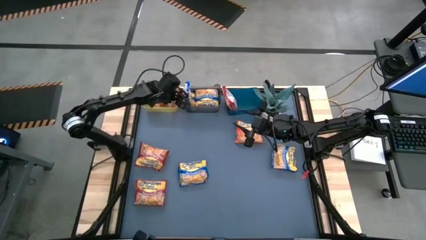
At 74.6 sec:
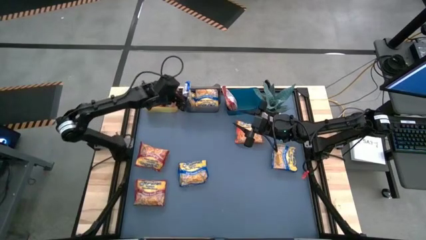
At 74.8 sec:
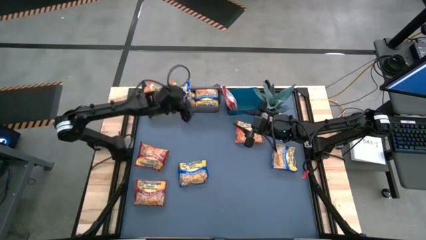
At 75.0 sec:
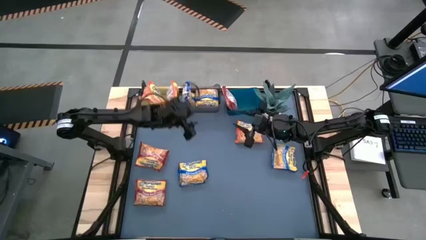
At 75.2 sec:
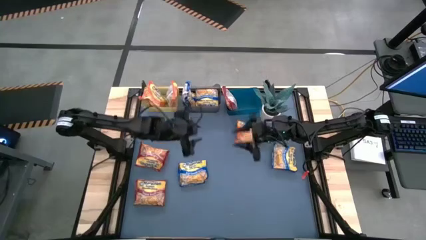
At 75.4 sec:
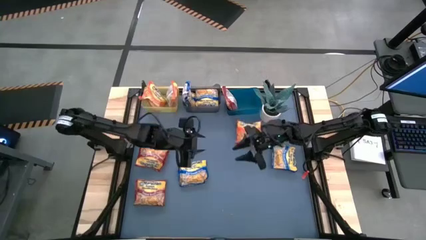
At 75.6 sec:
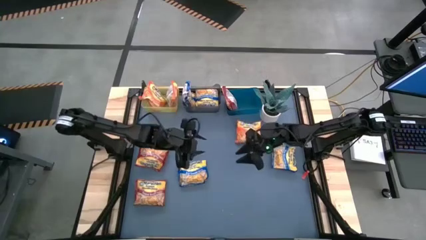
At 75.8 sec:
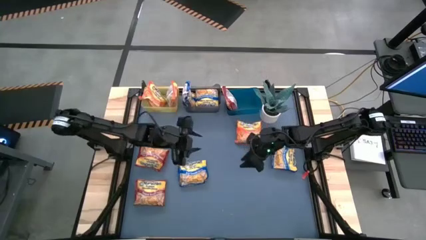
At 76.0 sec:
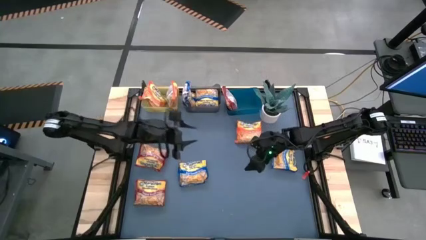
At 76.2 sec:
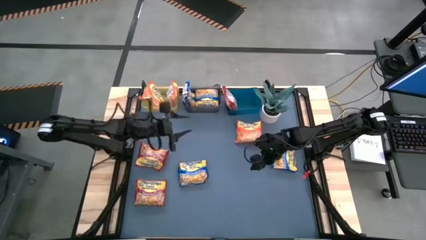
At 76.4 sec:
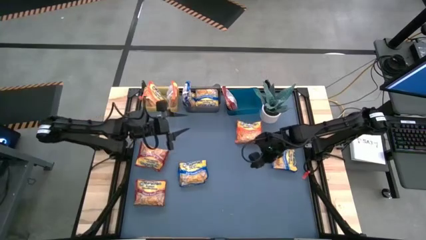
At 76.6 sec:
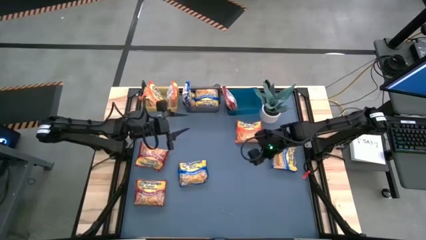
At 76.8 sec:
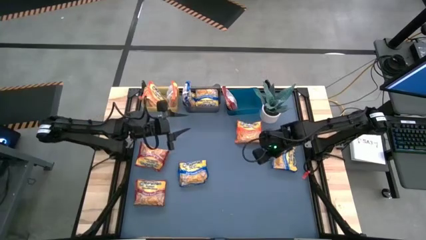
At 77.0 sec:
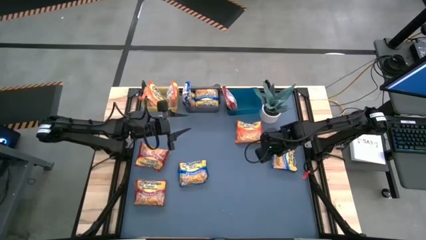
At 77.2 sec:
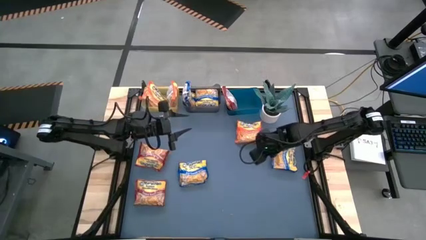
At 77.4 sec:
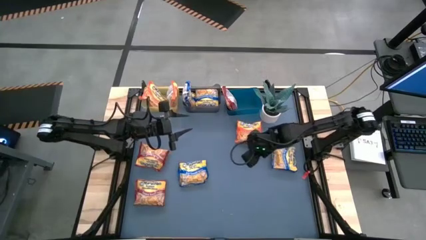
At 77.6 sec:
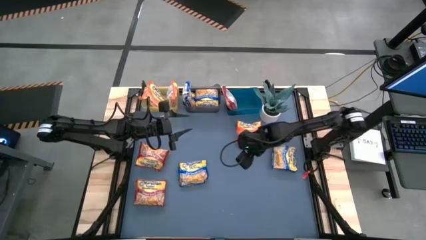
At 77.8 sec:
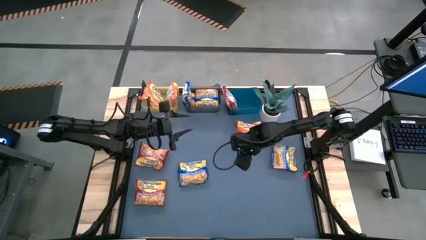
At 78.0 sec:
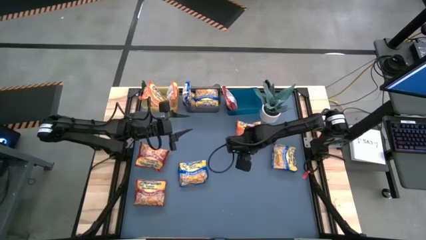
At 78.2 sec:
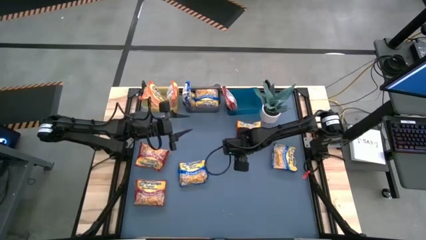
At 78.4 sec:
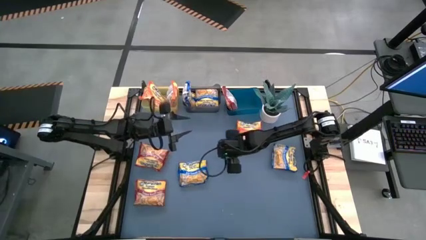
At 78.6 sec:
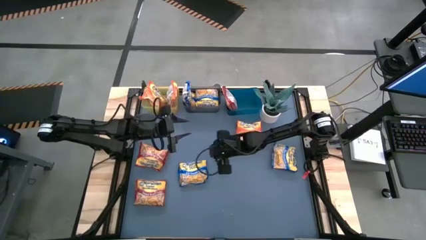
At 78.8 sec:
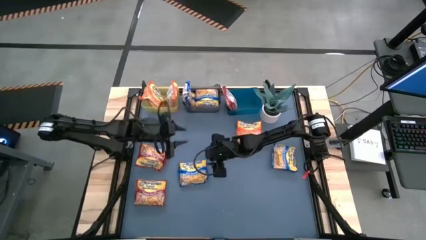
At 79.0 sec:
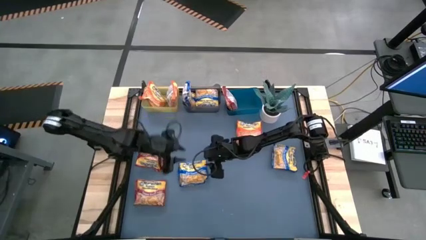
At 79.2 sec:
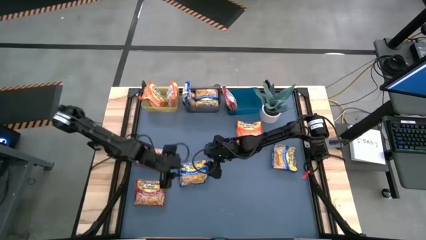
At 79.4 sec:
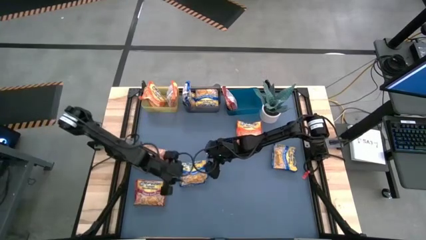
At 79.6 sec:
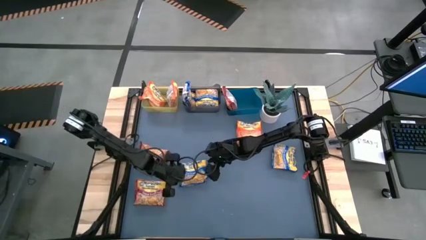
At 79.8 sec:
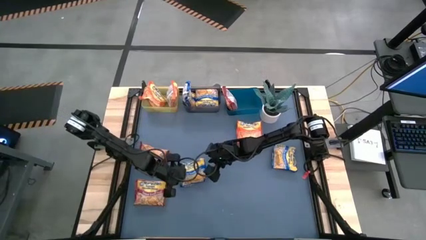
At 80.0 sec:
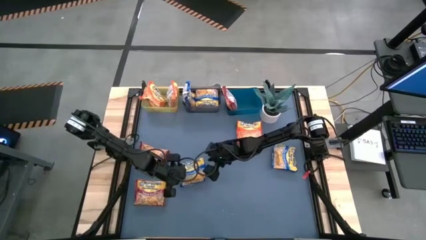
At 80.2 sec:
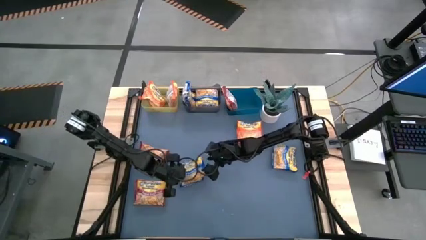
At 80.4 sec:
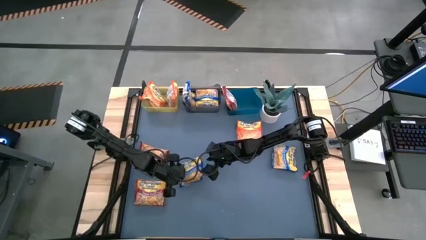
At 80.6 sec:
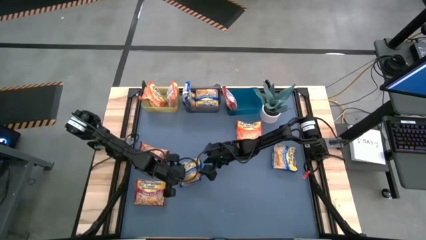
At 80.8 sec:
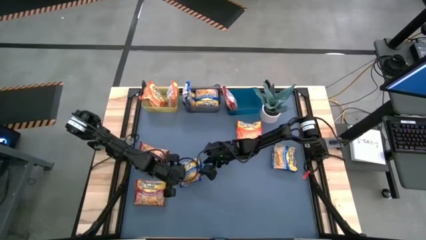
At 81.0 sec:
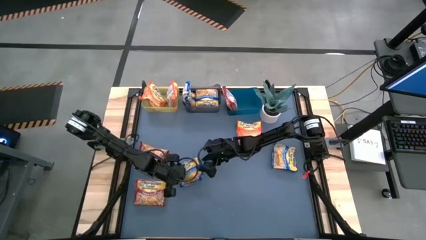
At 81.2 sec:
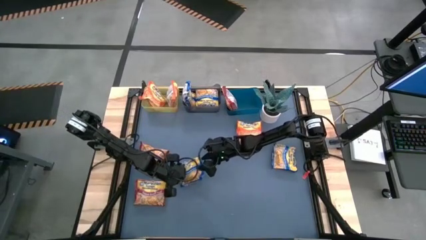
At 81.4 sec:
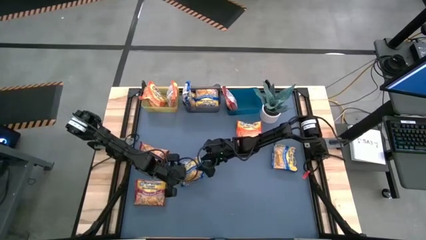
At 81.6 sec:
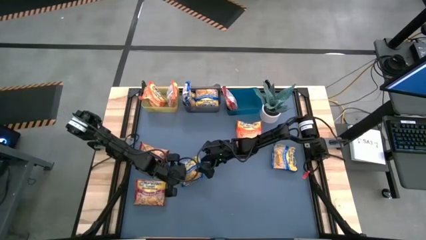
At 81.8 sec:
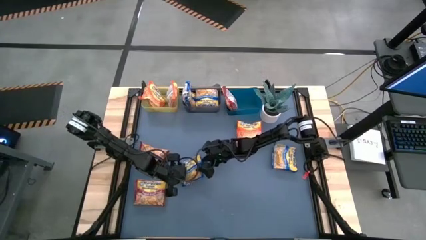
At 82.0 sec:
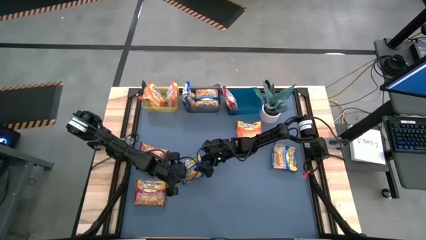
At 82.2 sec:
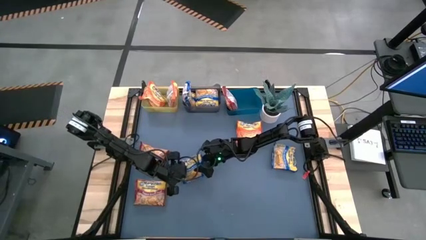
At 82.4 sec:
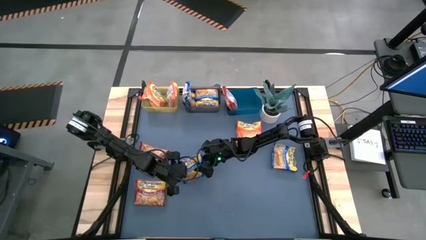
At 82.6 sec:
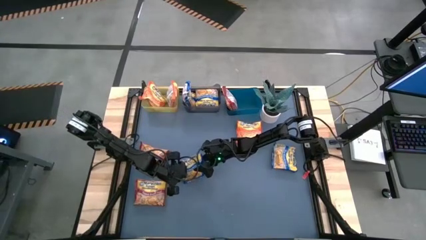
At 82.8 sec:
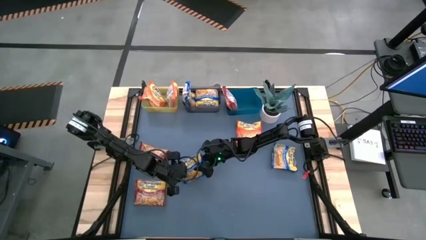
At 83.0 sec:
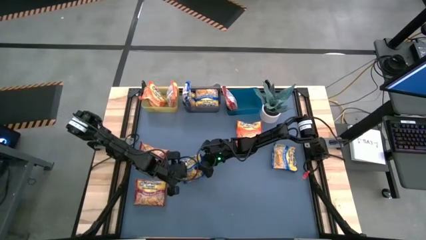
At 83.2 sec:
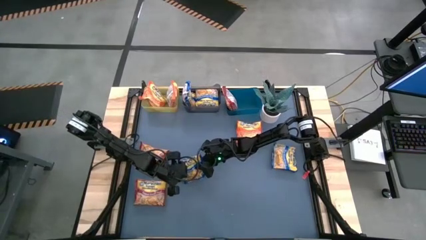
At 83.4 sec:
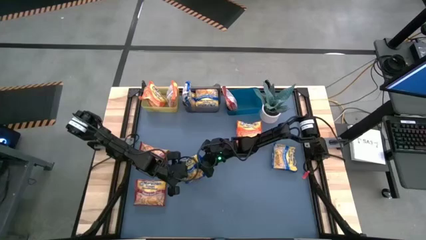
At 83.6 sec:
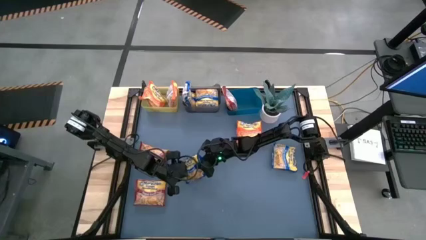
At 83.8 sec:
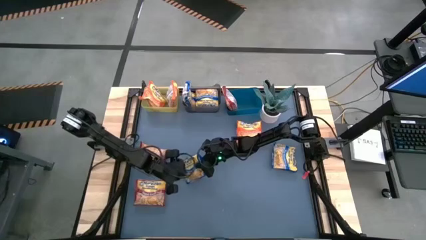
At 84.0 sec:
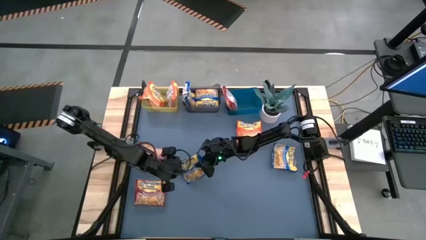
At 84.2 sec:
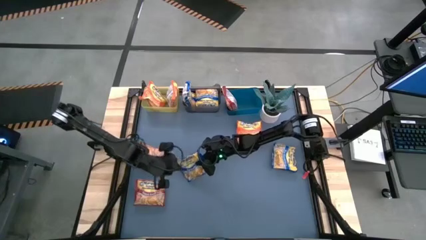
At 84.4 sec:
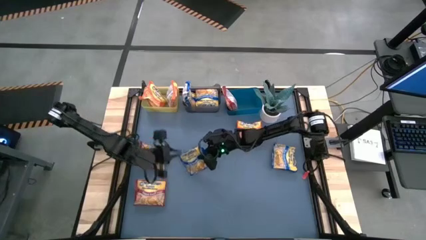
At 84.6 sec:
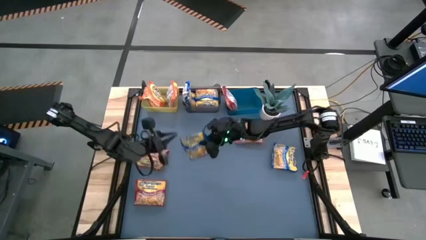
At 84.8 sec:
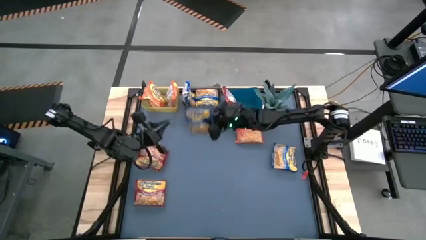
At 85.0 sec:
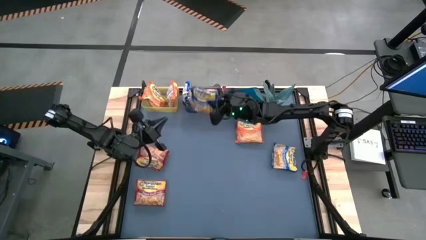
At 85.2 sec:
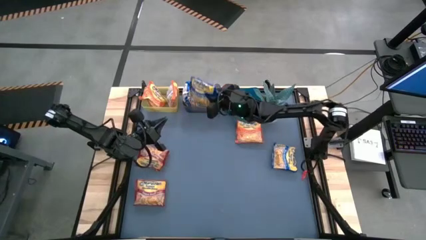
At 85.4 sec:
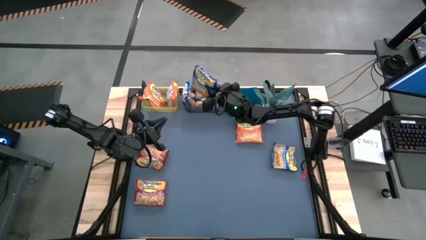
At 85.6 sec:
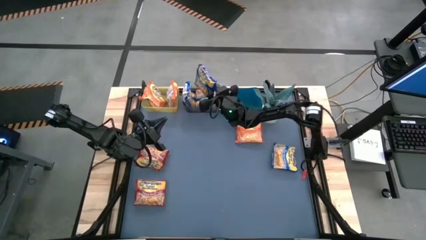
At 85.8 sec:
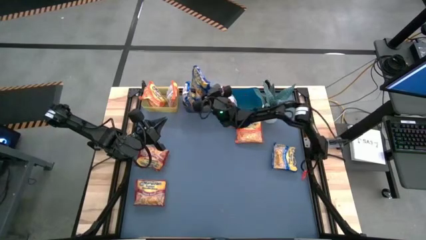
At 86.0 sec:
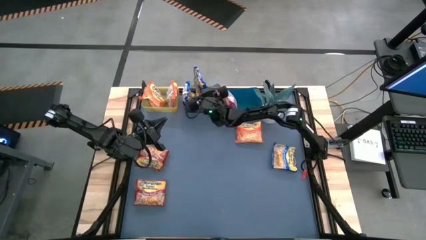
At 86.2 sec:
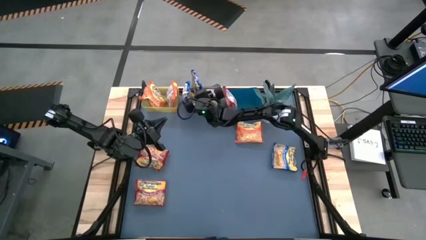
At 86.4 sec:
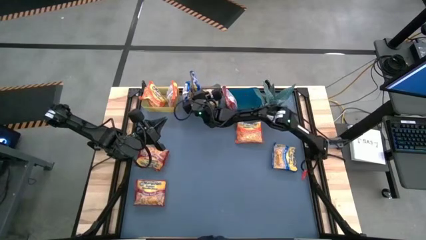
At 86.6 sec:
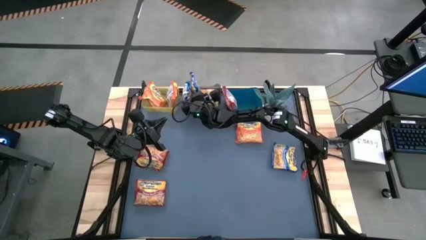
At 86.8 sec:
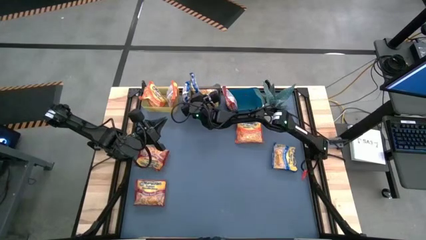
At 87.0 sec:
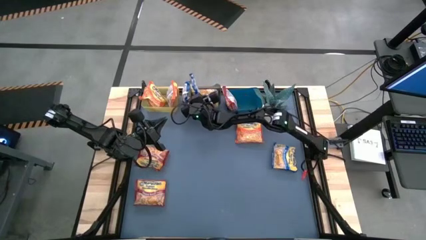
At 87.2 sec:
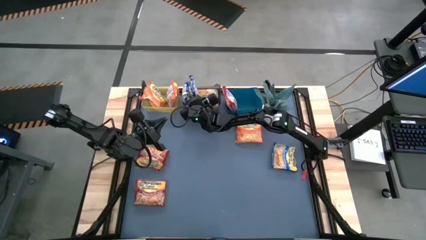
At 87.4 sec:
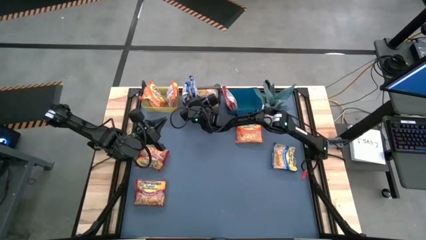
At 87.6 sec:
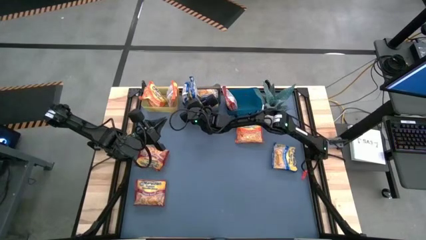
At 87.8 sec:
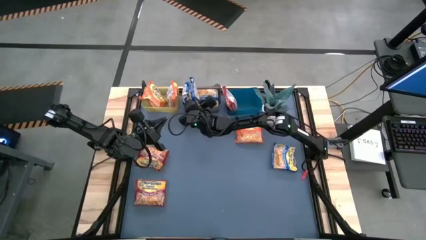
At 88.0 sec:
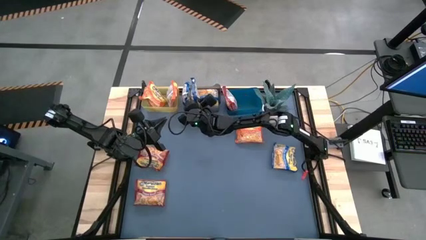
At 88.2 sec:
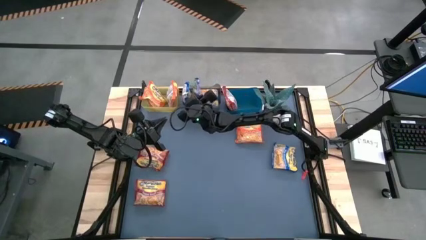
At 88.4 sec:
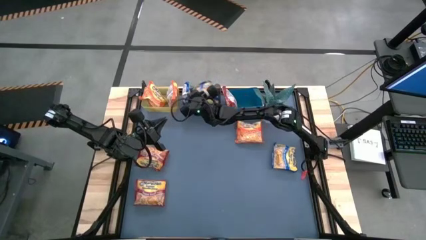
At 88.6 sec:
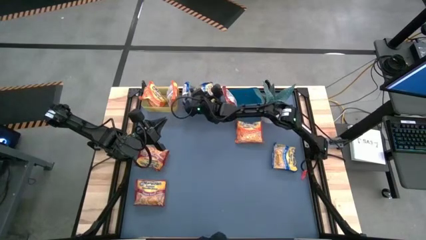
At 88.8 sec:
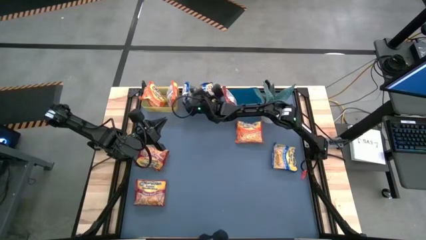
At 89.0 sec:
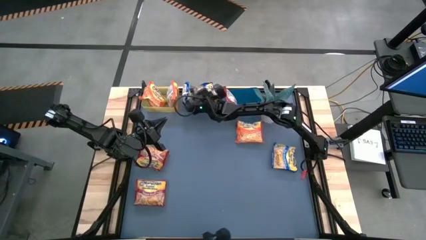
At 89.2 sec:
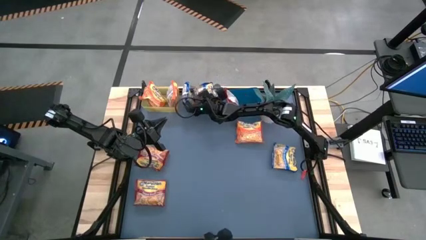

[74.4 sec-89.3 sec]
Task: Sort Maruchan noodles
Put the blue noodle pack into the black bin
